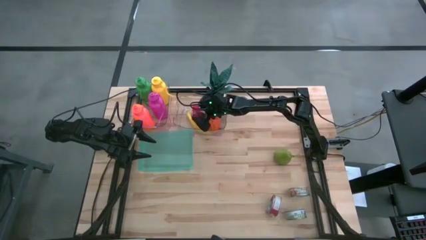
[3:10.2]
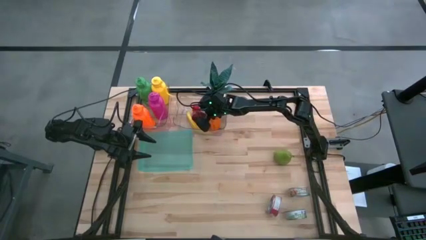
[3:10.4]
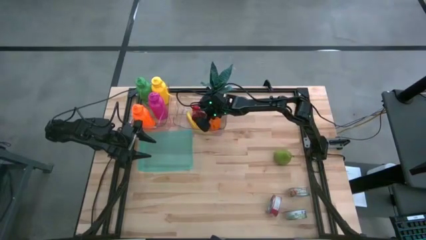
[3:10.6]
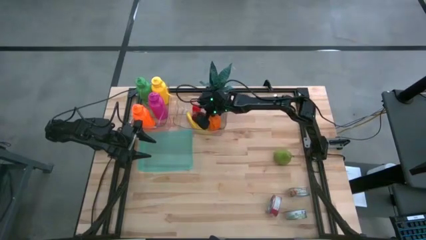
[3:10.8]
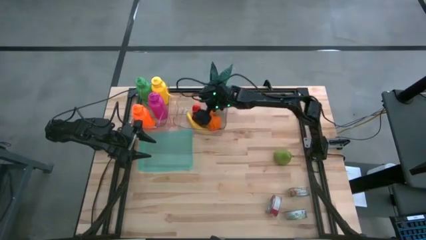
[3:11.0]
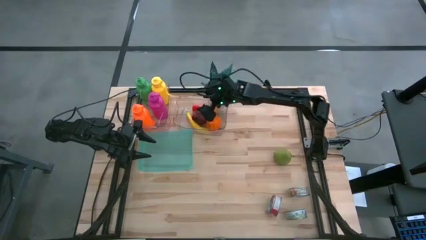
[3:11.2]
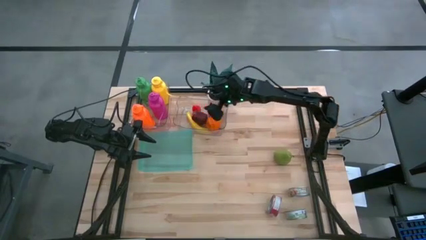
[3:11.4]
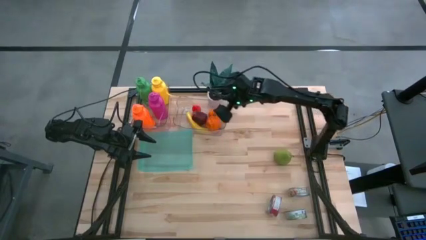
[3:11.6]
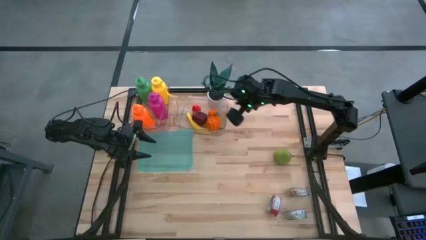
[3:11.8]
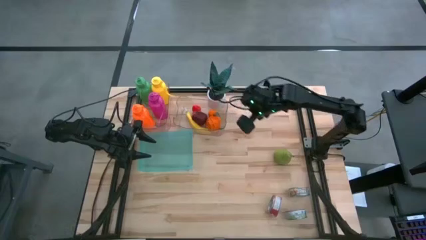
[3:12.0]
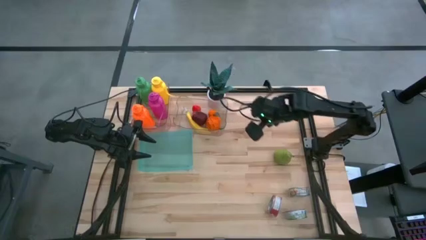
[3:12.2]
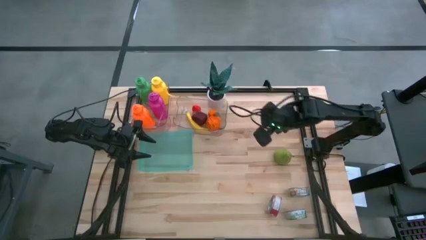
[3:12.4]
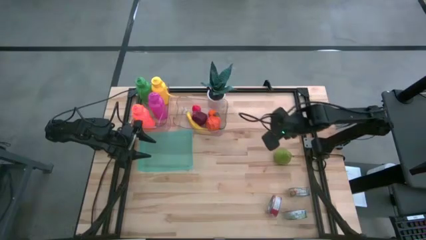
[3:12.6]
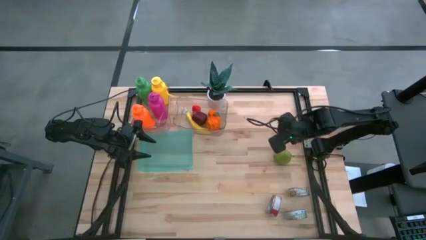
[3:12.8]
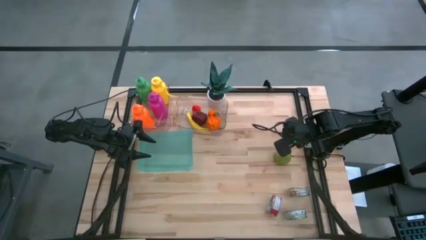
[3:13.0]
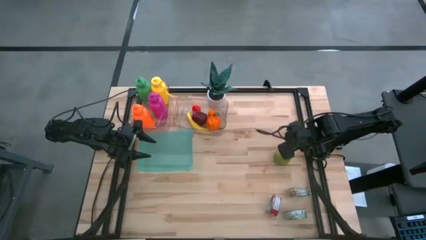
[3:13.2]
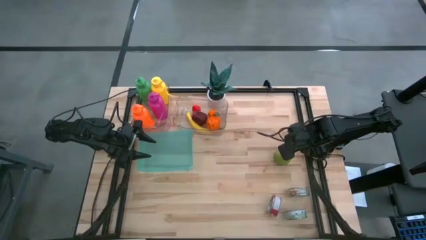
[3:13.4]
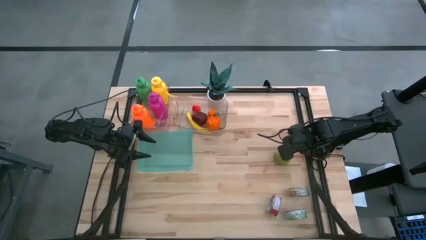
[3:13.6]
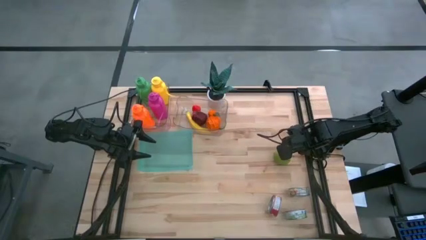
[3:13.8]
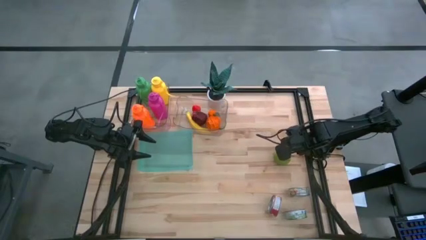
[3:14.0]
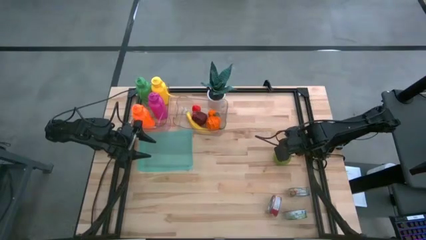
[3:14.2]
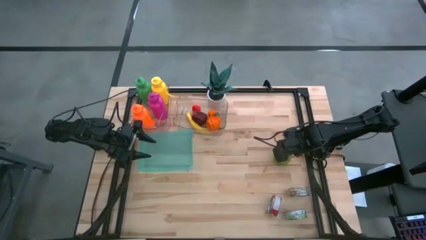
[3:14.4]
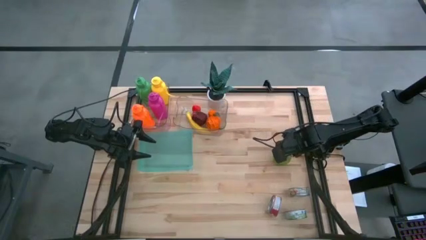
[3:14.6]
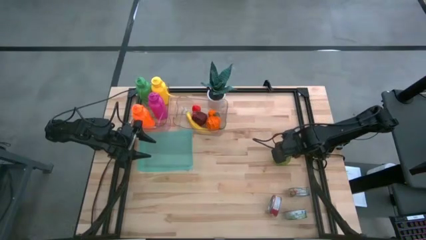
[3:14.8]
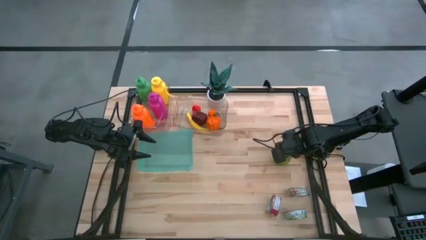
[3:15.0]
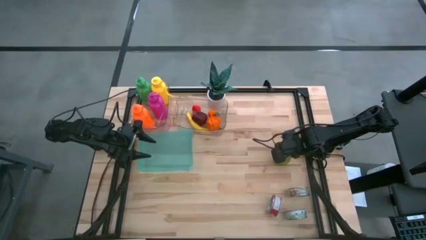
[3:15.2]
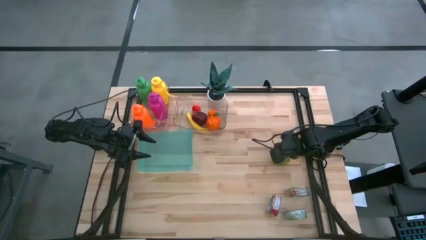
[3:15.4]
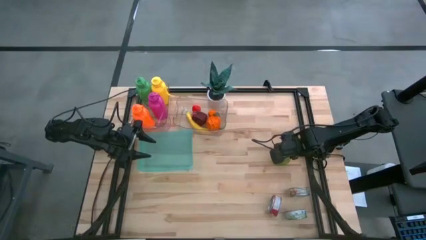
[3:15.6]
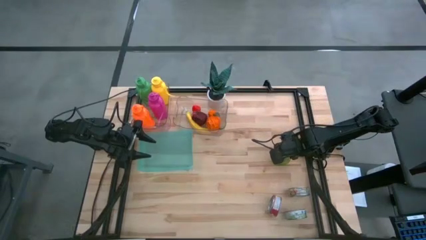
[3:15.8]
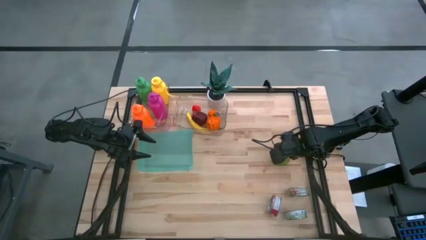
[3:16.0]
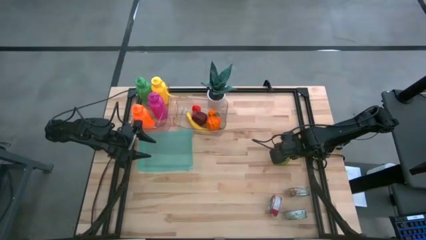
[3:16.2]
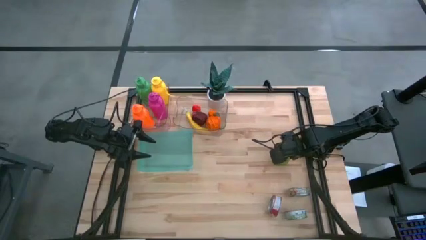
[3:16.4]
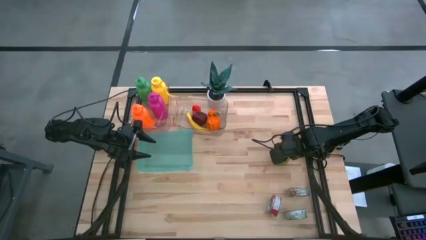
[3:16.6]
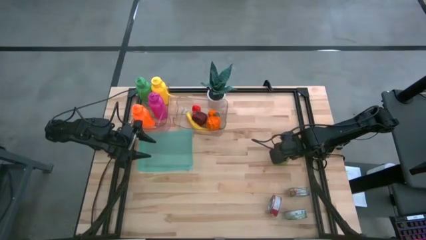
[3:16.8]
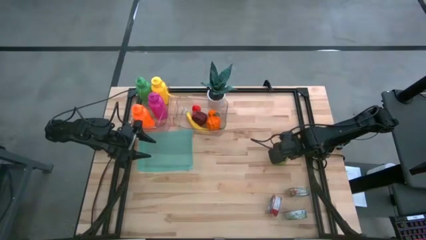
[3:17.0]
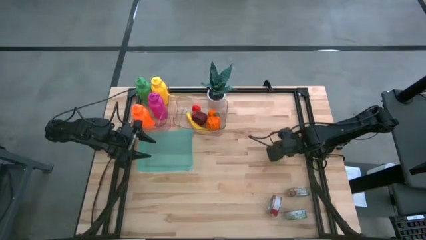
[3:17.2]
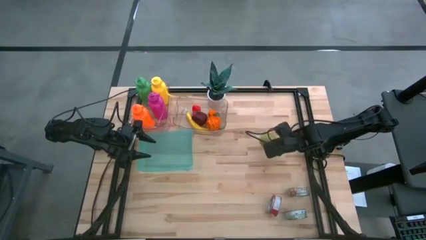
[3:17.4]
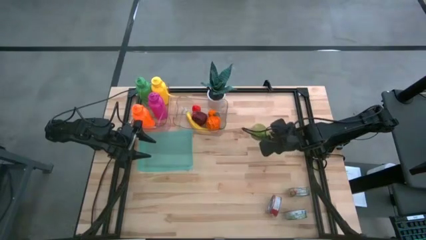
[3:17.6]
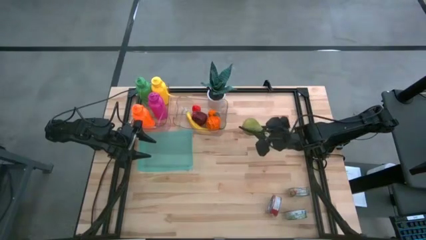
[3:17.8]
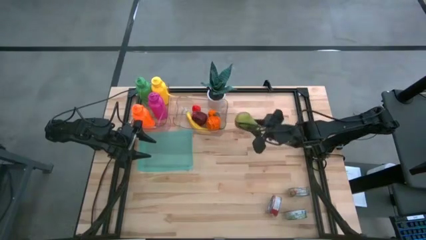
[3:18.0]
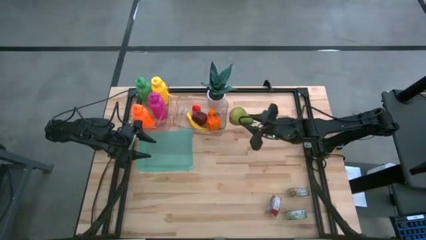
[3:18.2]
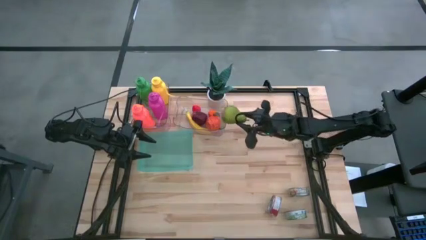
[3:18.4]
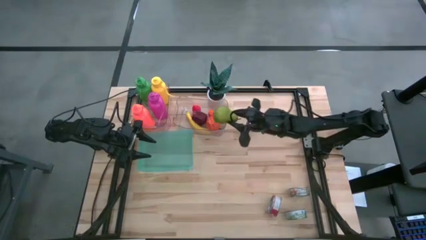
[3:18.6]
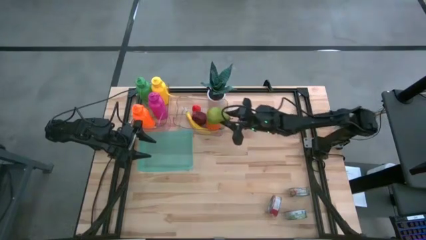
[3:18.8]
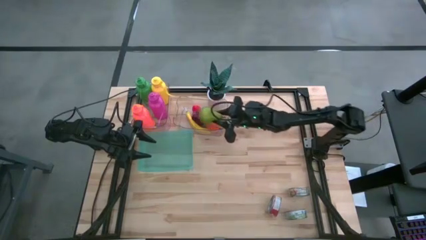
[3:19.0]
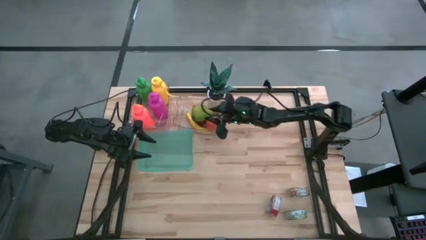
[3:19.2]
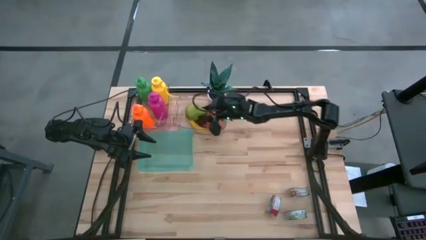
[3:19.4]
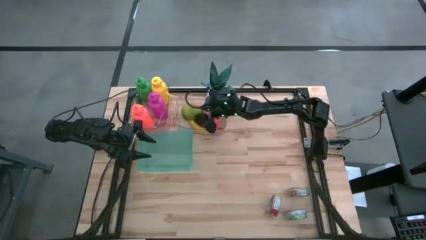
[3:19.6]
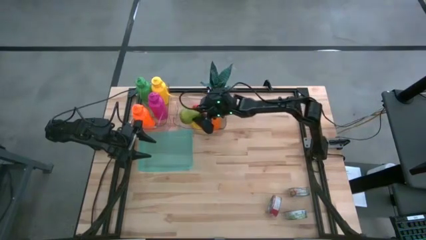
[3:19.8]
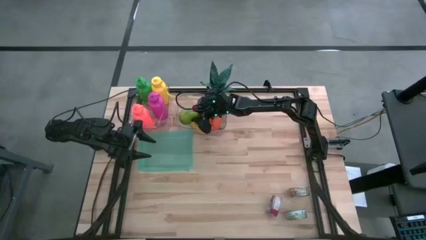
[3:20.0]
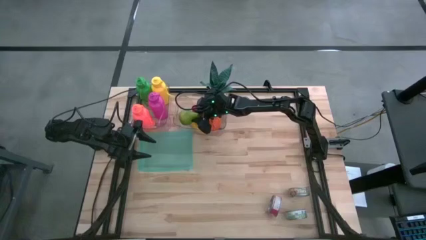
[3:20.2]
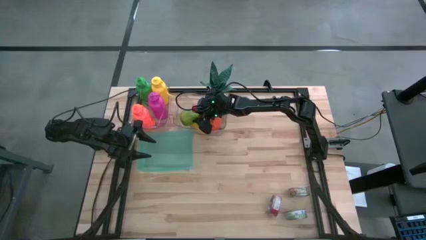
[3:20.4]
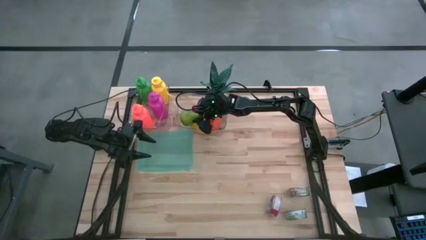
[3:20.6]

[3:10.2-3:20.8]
Task: Pick & Place Food Item
Put the green pear into the right transparent bin

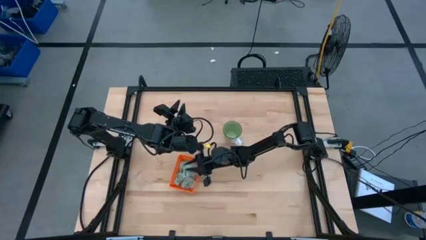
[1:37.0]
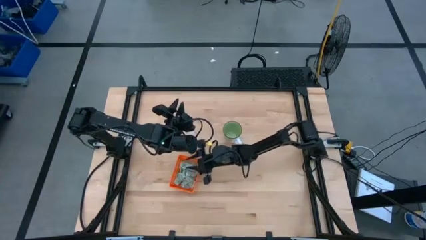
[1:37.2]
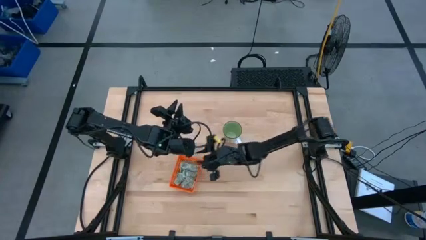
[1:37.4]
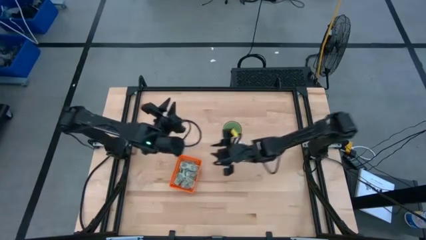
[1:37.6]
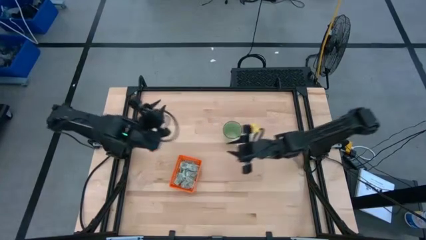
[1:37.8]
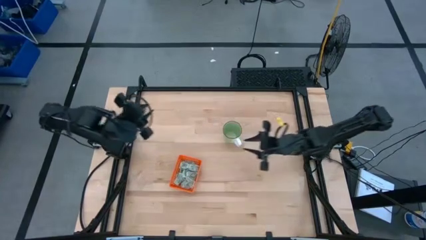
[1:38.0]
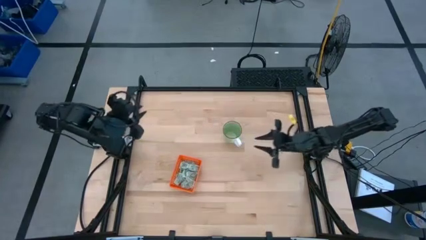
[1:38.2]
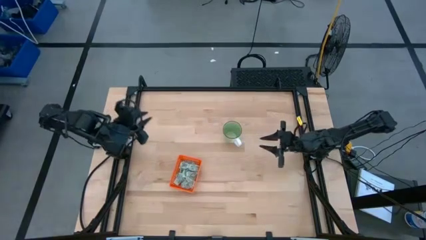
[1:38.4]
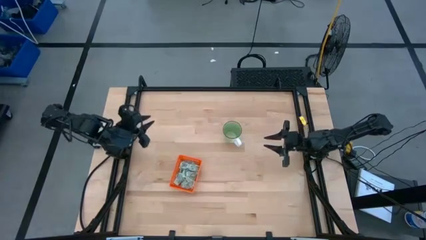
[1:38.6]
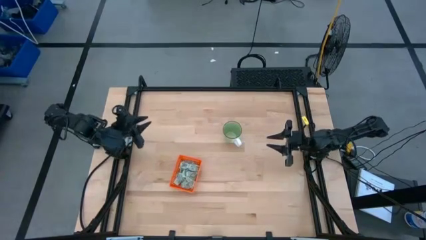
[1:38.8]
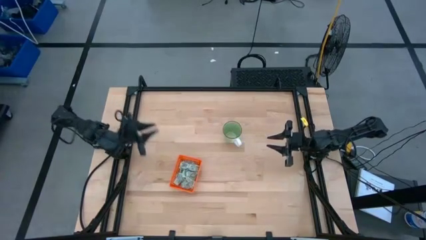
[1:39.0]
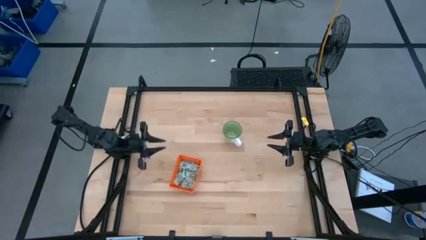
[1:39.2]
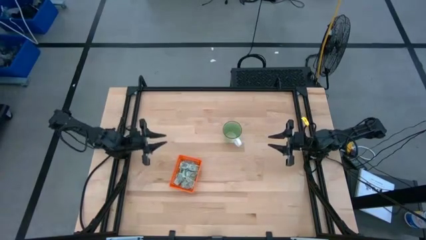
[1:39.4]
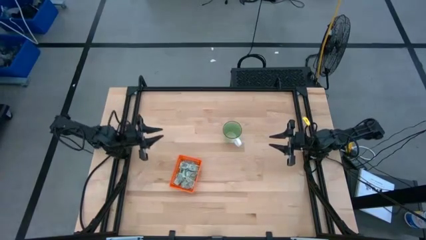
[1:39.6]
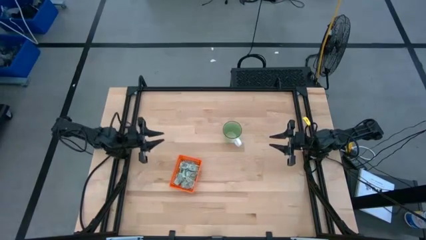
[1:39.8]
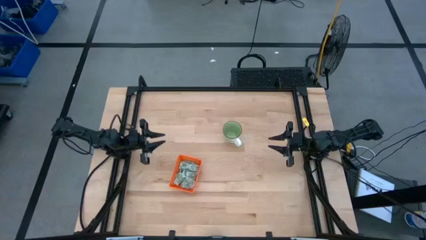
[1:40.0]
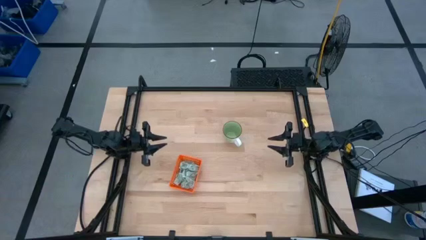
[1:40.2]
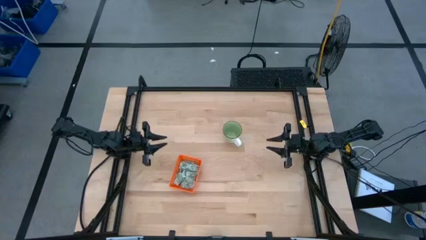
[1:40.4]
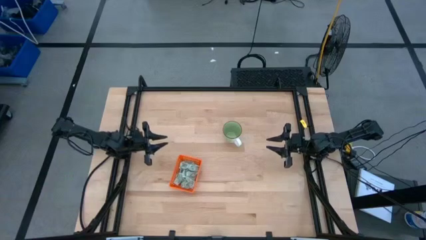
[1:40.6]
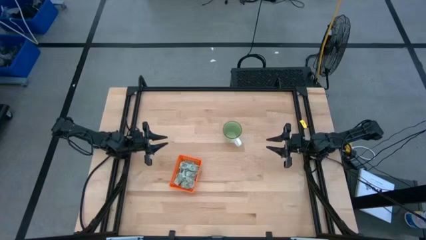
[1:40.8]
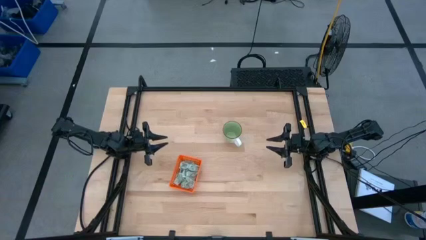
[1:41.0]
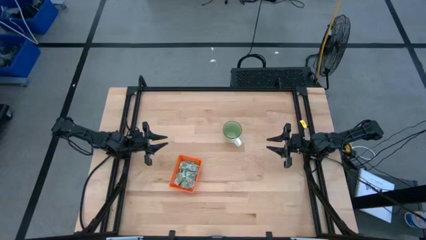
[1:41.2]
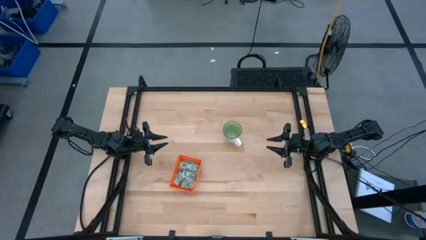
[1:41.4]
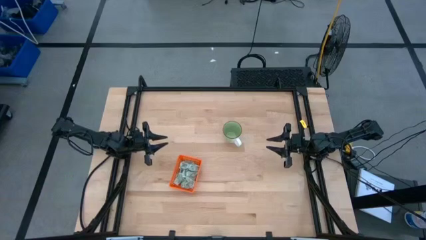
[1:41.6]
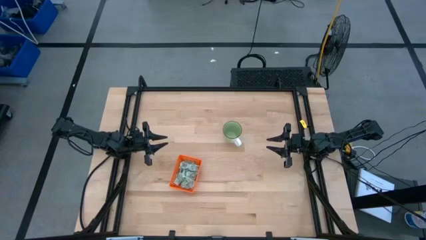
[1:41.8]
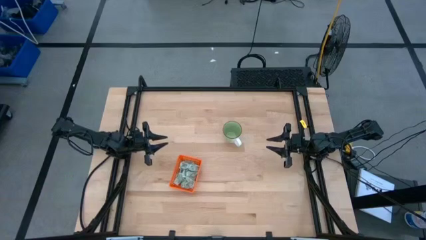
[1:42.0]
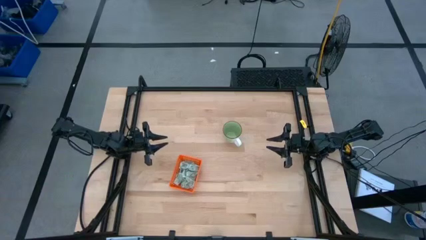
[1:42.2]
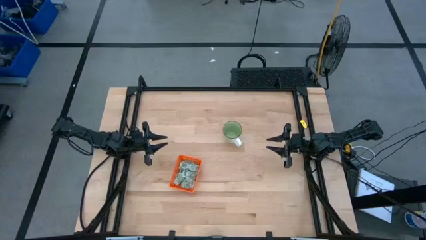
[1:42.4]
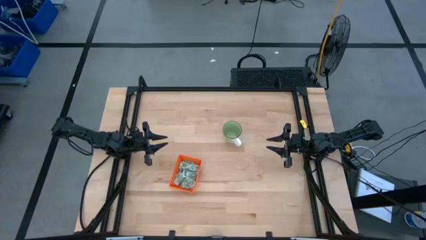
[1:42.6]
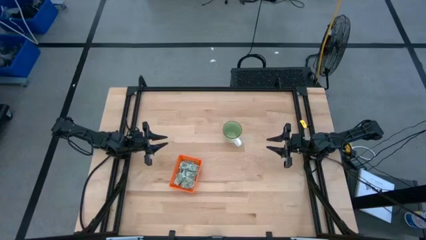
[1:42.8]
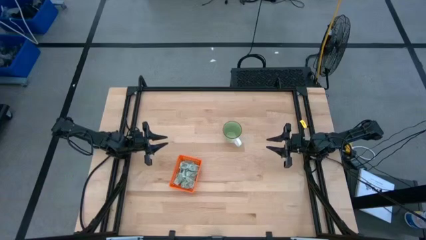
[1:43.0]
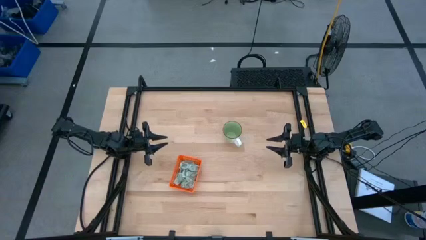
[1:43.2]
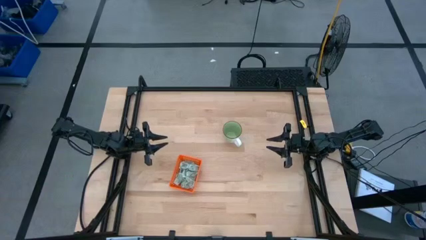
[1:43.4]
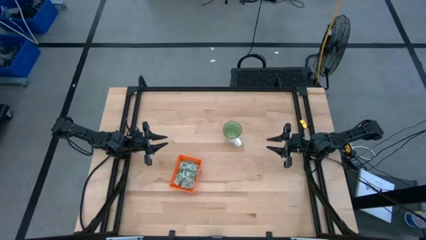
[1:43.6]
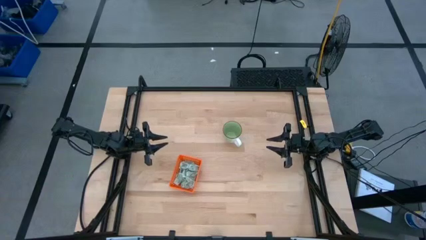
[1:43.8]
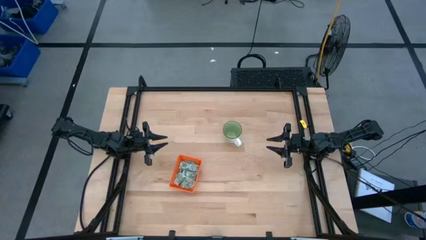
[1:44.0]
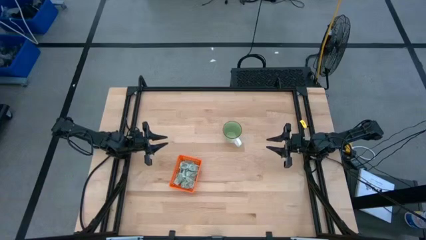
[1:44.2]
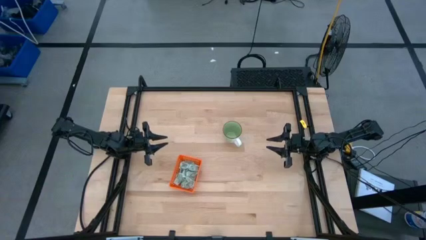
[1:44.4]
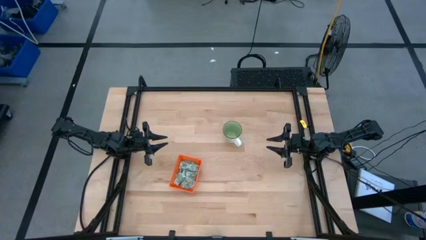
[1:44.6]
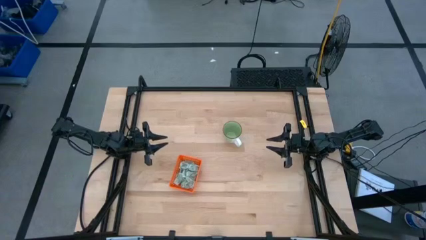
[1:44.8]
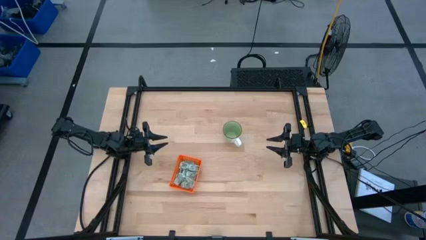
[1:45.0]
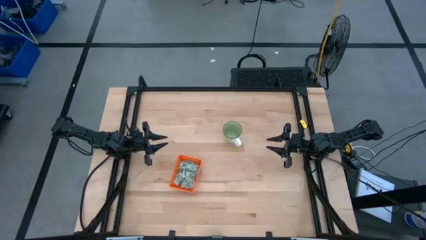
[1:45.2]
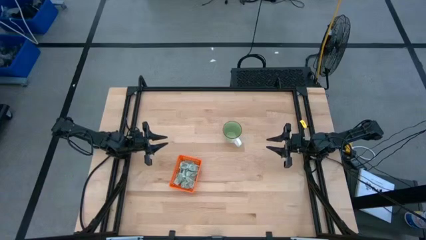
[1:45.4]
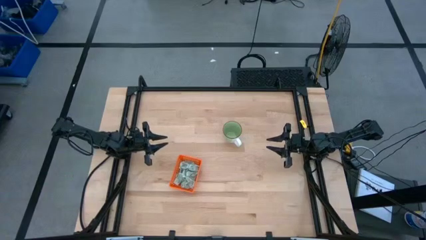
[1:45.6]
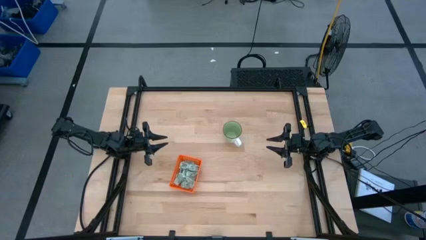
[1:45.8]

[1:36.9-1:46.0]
Task: Pick and place Stevia / Truvia into bins
Return to Home Position
